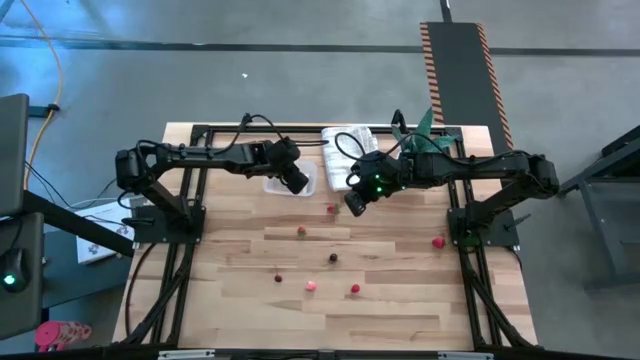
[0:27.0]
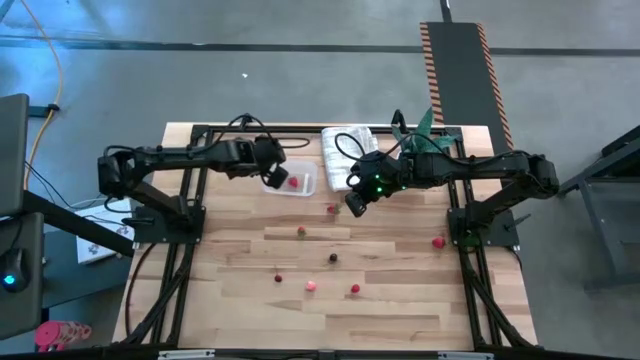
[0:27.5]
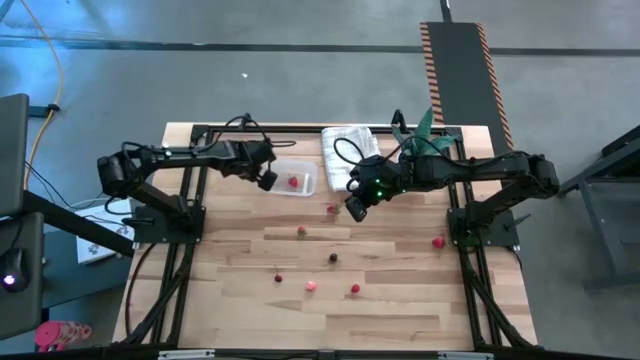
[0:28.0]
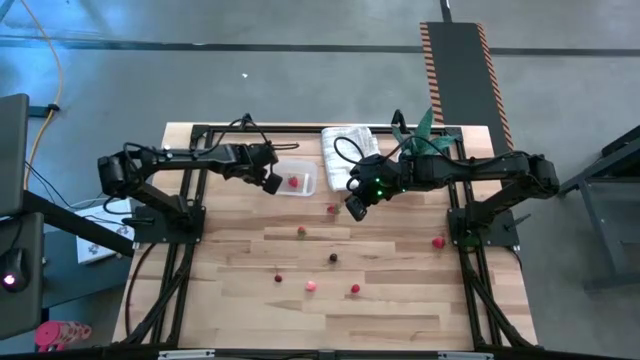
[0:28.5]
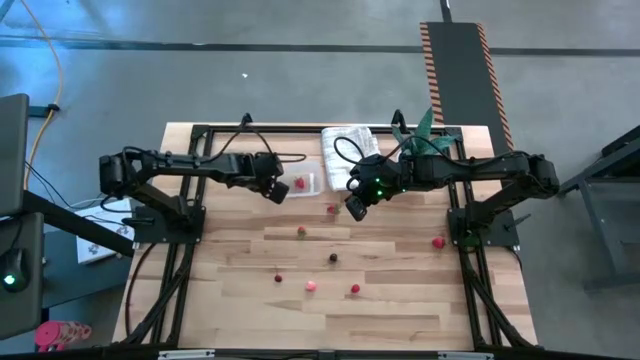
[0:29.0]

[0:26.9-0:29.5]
Task: Pick and placing Produce into tupperware
Adjust the transparent bin

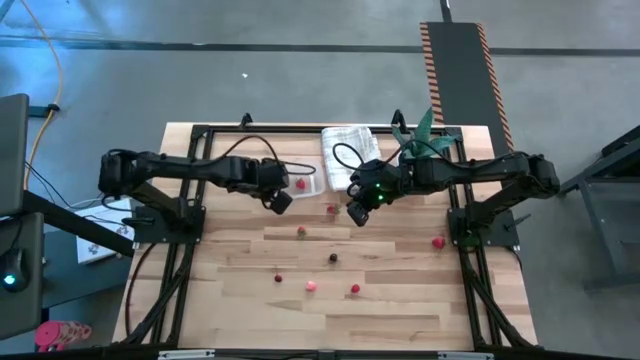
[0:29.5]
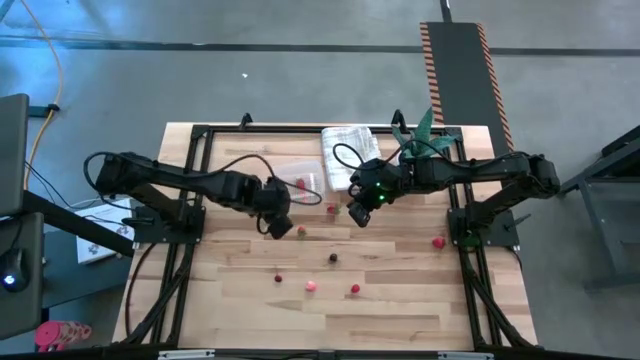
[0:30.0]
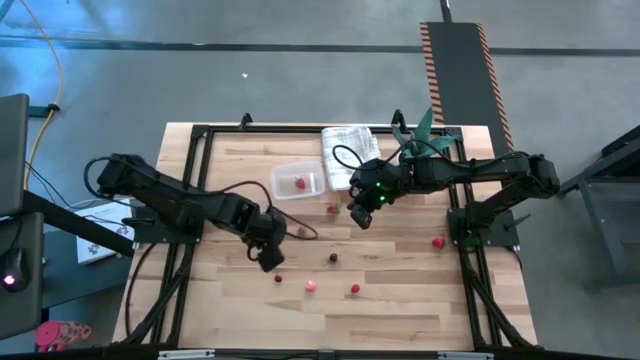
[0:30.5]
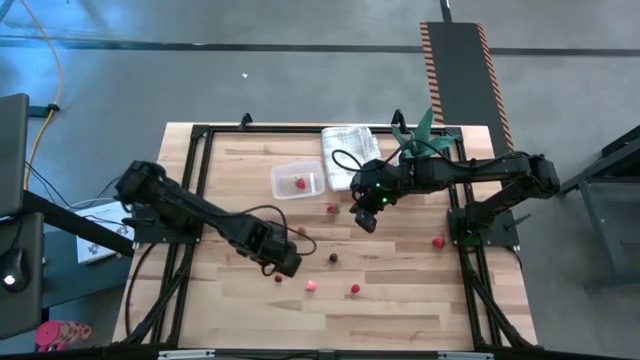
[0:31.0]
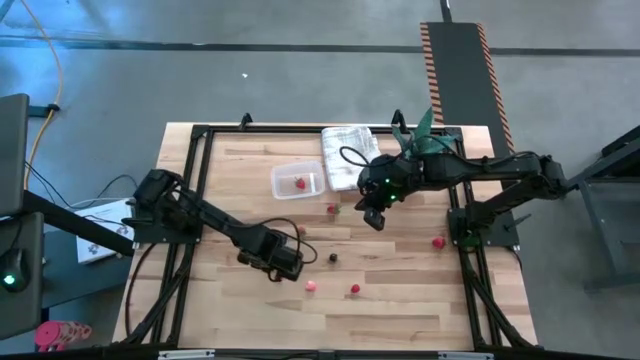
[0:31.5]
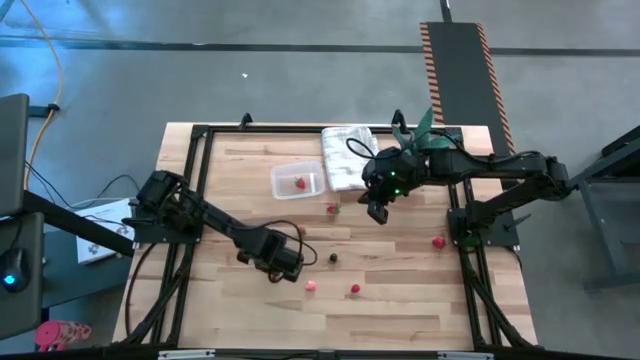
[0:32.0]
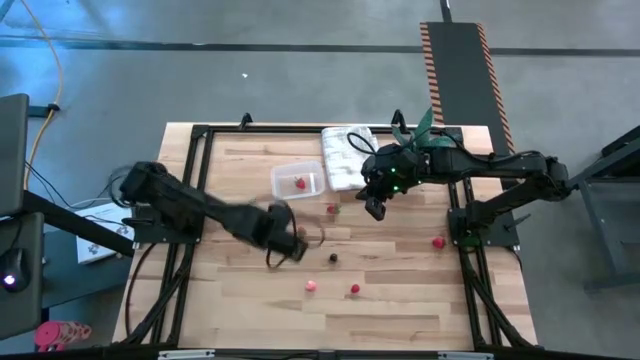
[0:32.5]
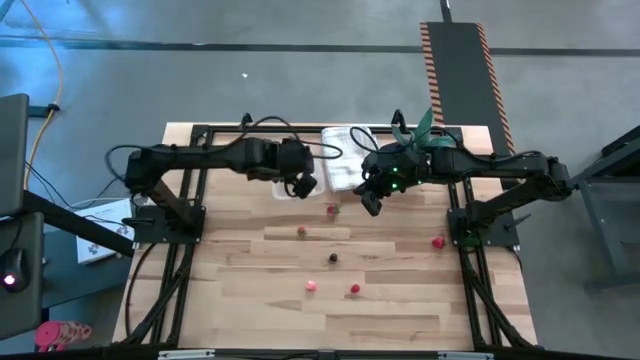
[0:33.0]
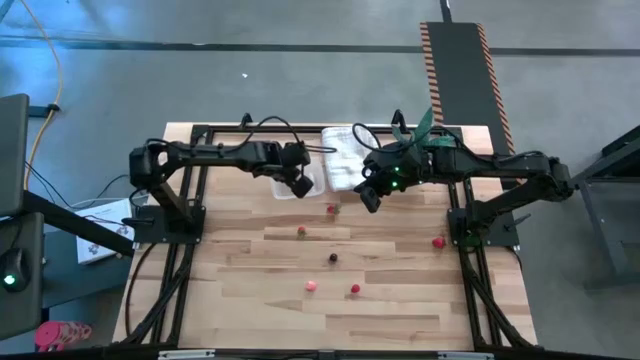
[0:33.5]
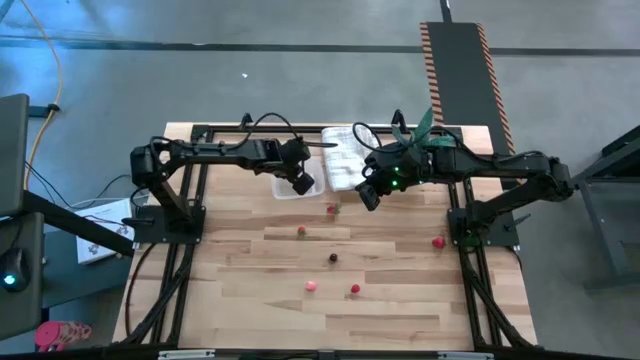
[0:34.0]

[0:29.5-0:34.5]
Put the red cherry into the transparent bin

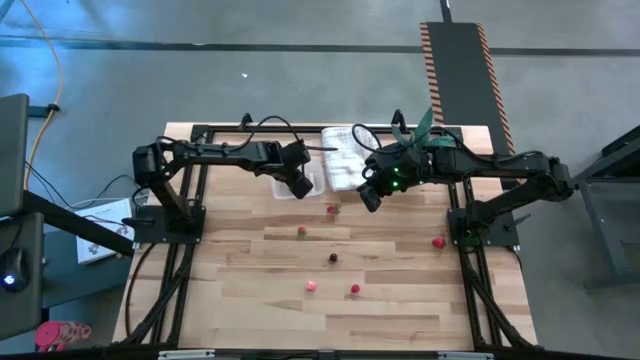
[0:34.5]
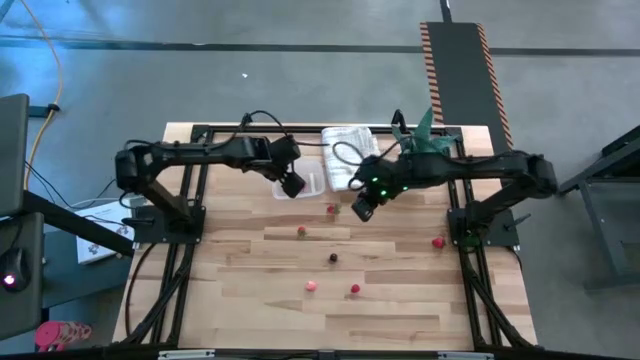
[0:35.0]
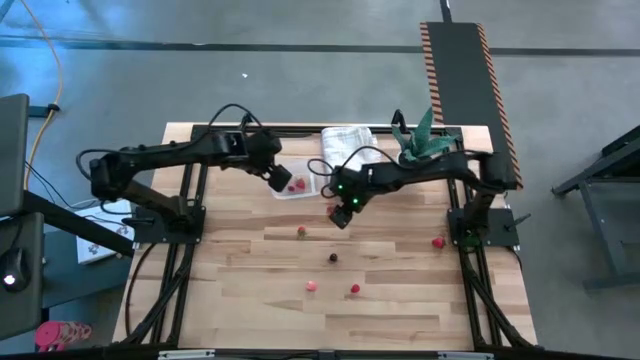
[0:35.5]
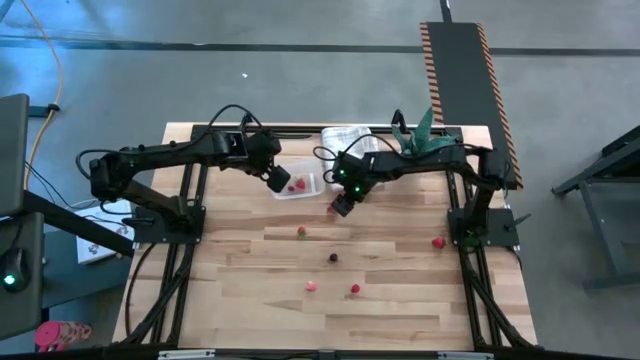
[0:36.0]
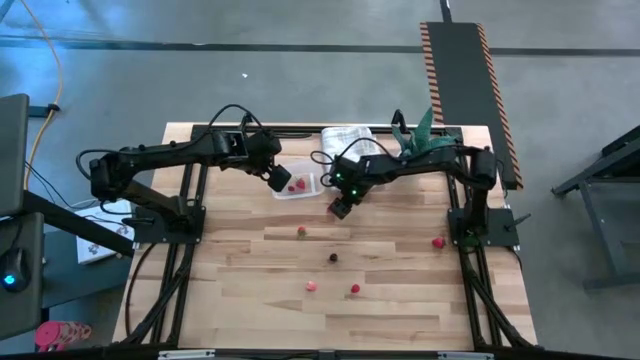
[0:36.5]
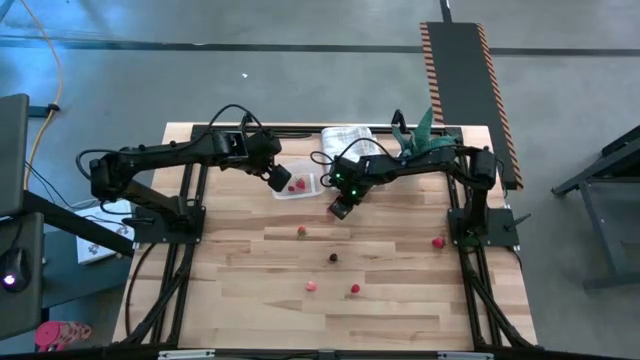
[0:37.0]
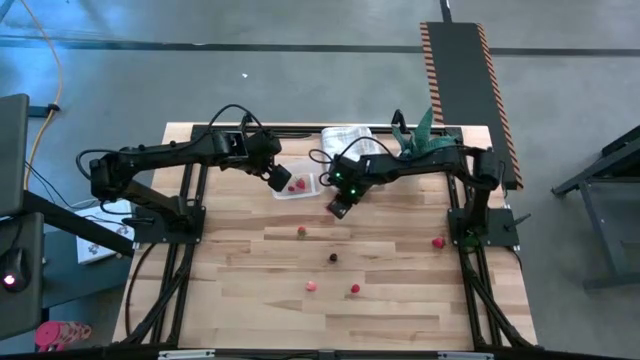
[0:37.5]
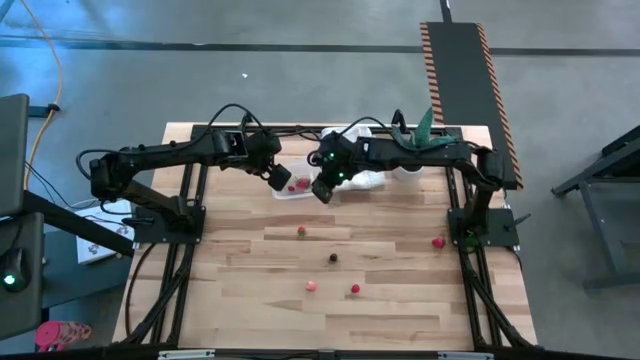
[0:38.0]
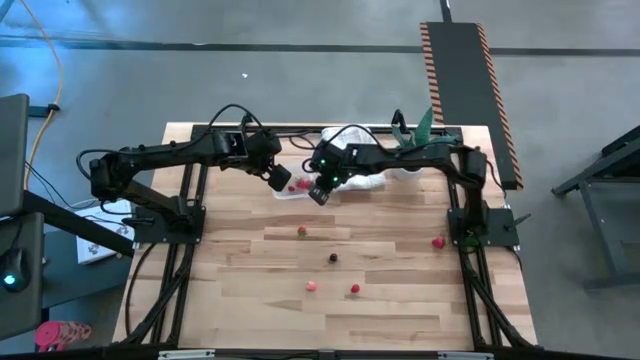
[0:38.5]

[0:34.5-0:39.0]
Put the red strawberry into the transparent bin

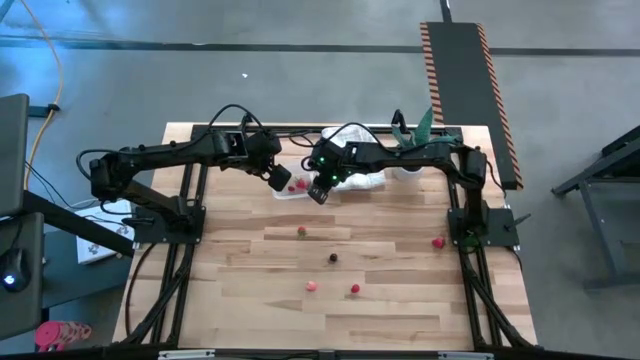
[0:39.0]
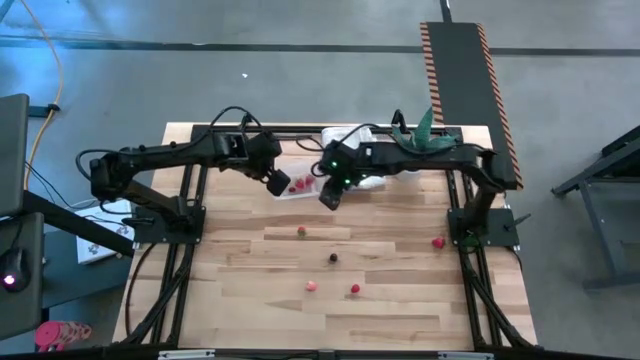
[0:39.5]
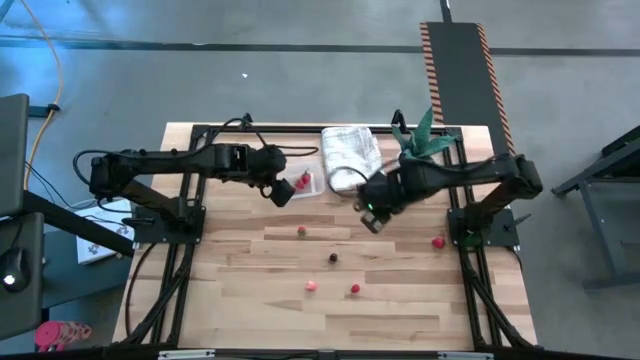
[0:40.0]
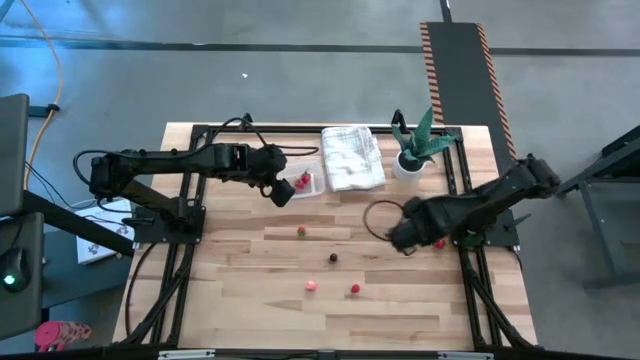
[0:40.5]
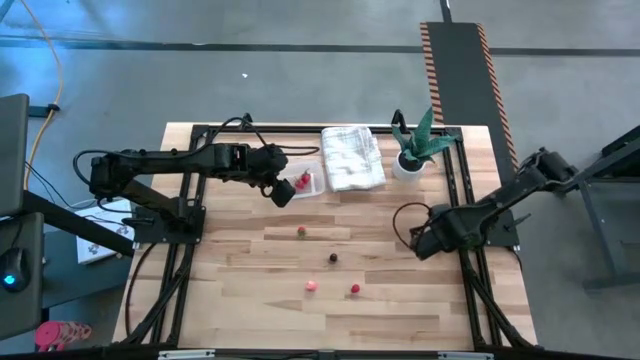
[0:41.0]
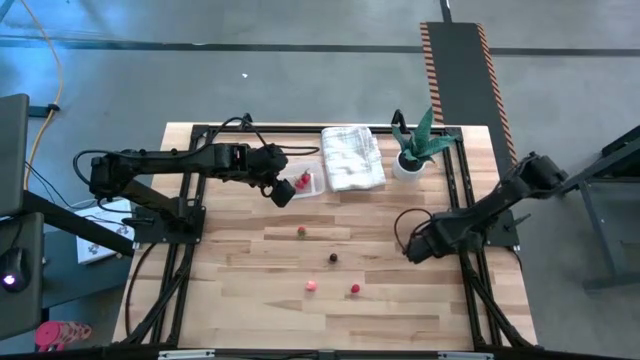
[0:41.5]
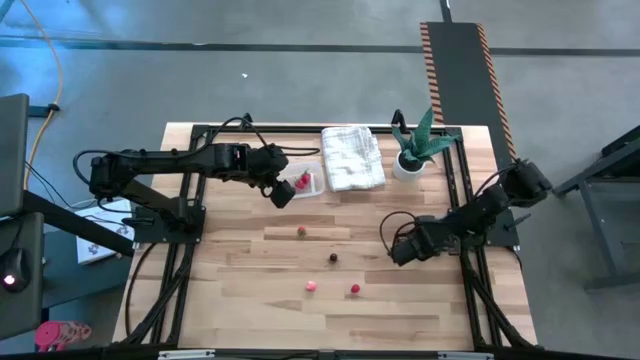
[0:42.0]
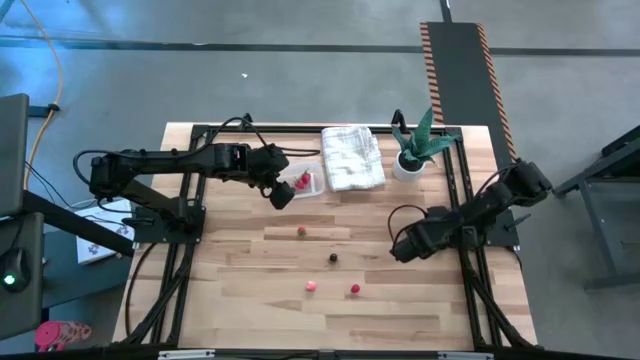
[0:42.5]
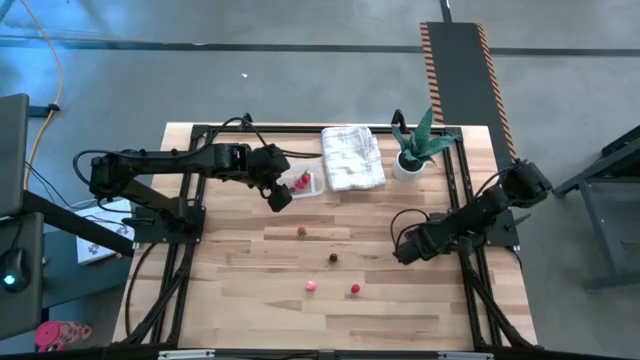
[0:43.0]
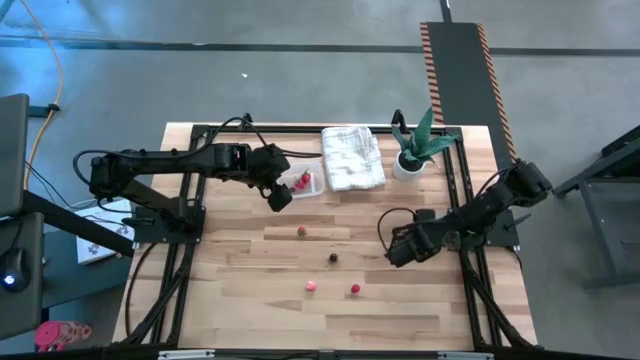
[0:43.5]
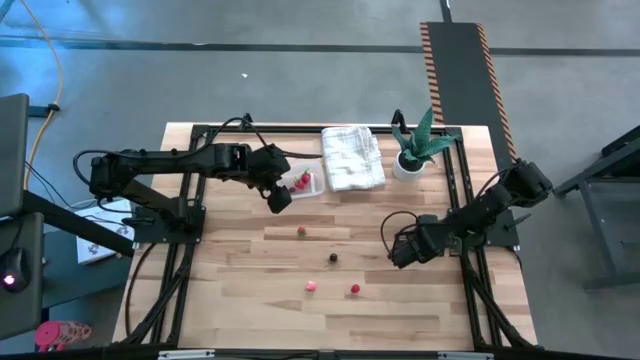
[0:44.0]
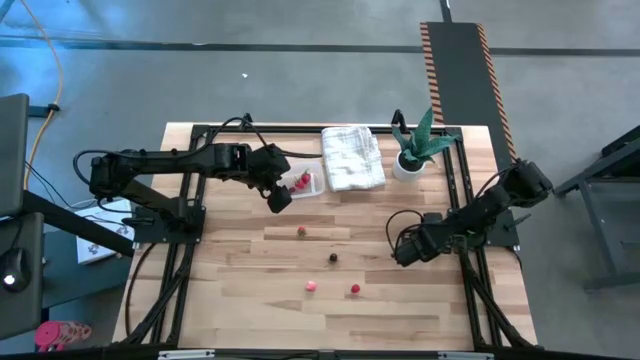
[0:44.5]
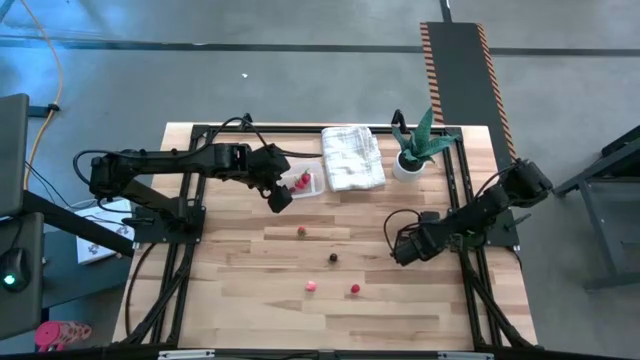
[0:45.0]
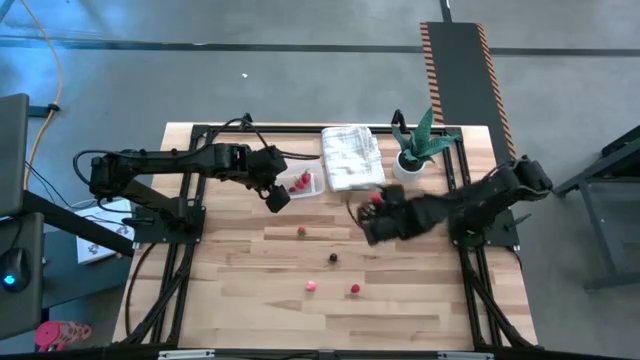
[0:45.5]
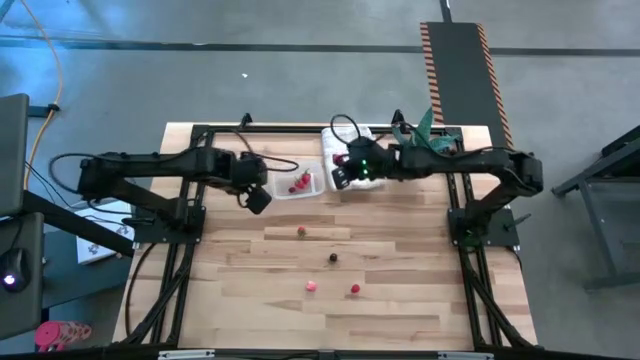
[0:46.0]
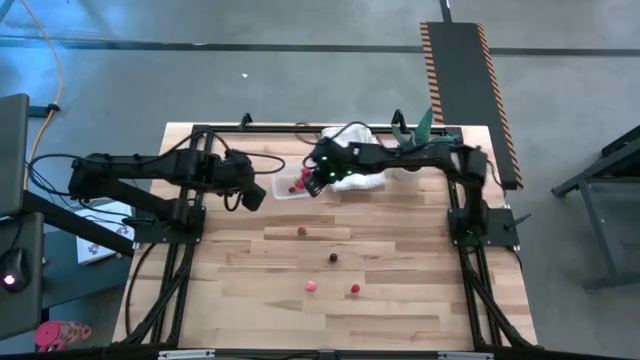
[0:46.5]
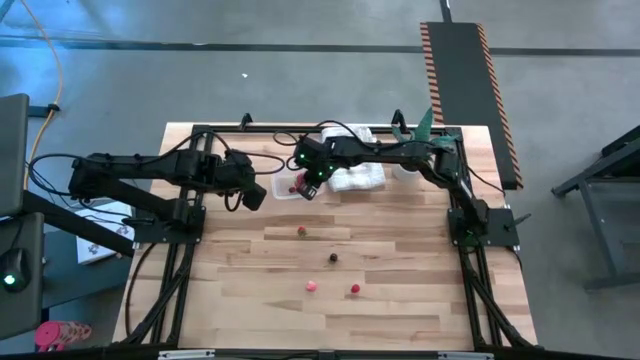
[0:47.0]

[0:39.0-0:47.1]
Put the red strawberry into the transparent bin

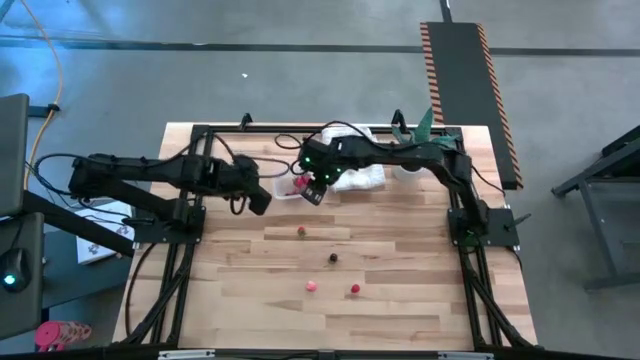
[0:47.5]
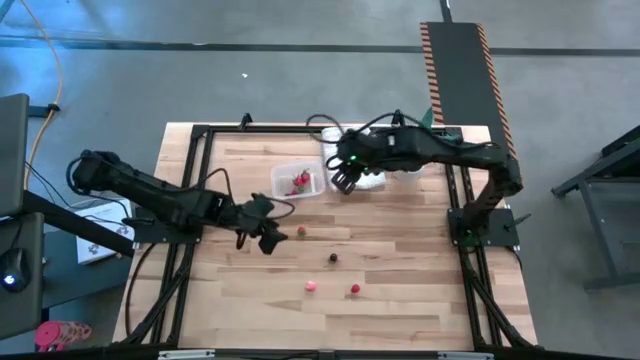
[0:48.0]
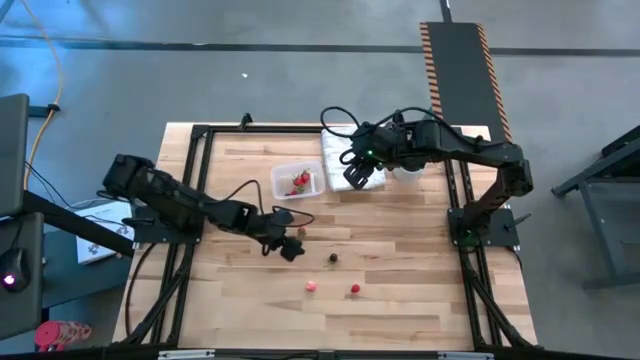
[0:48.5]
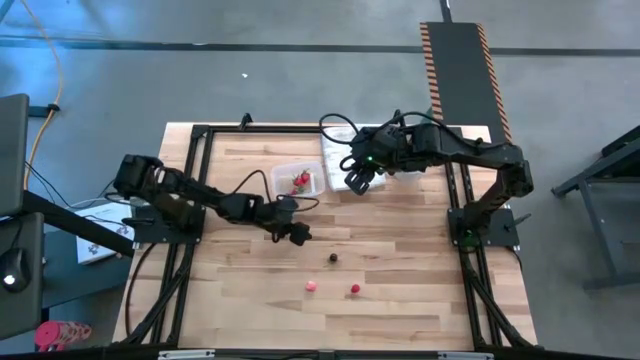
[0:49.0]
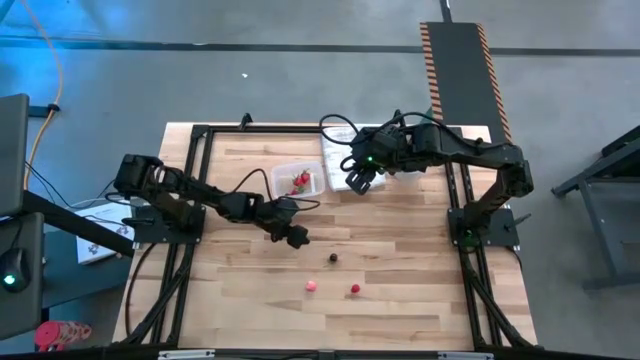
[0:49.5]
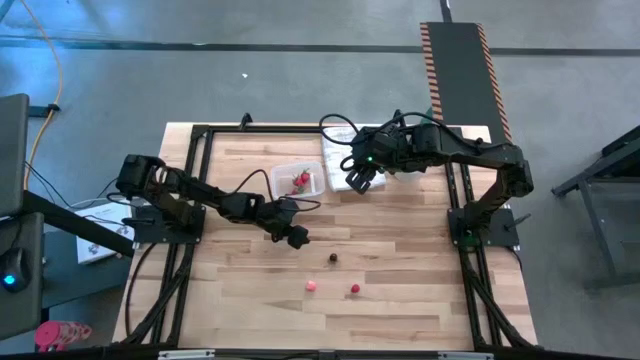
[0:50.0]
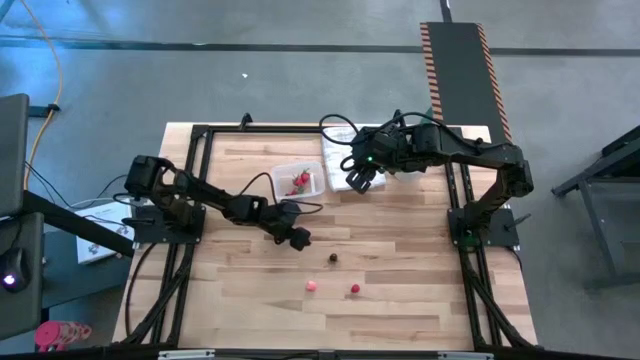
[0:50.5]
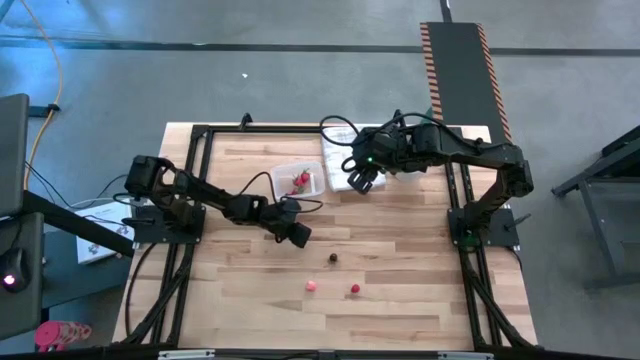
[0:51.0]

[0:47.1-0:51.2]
Put the red strawberry into the transparent bin
